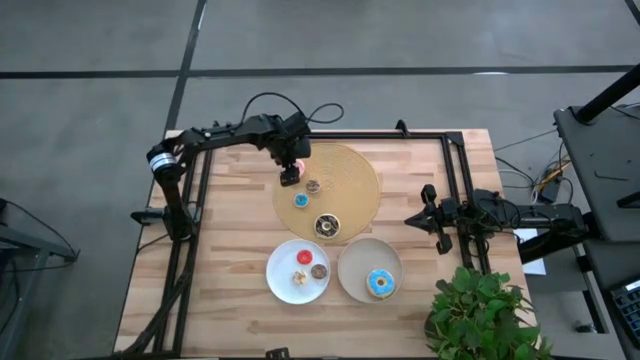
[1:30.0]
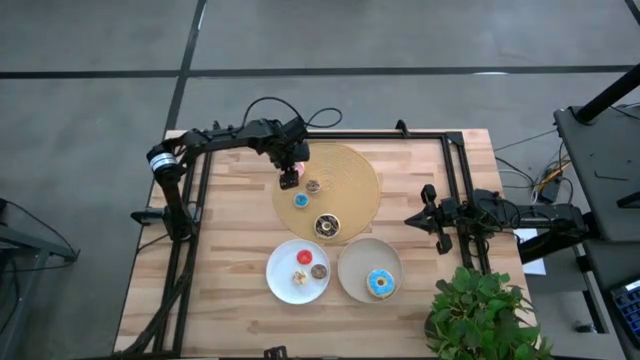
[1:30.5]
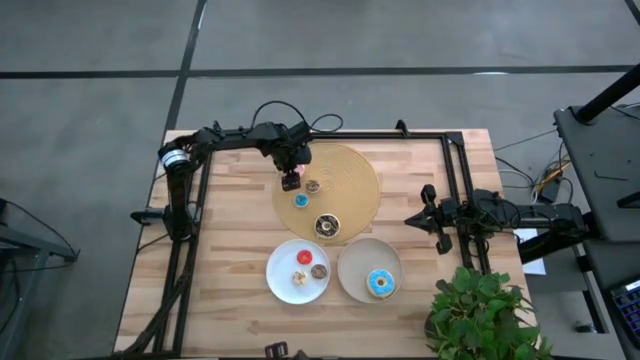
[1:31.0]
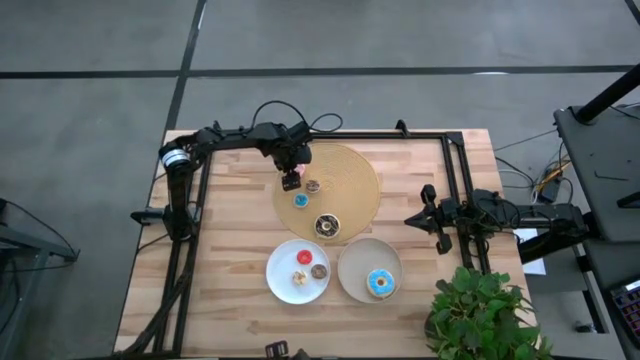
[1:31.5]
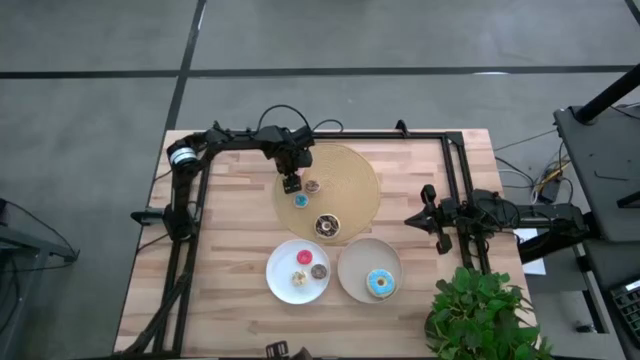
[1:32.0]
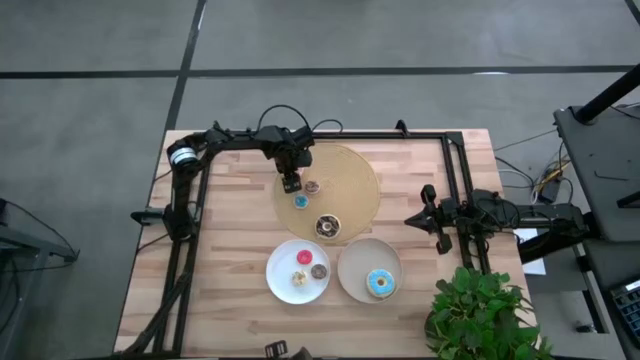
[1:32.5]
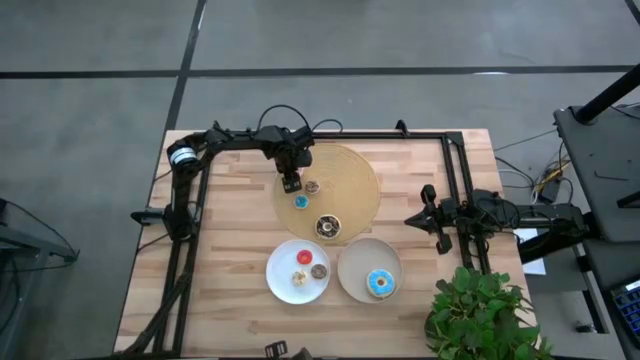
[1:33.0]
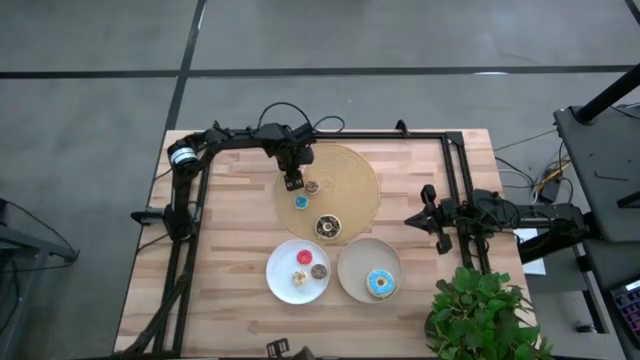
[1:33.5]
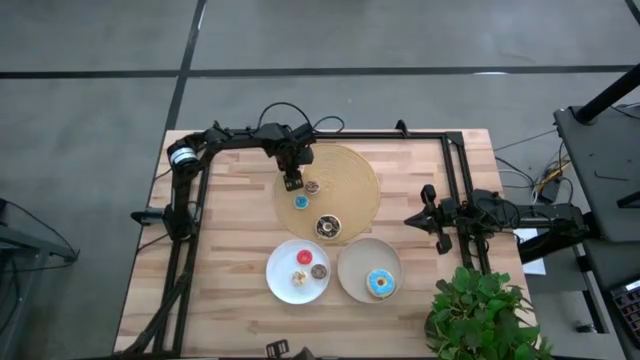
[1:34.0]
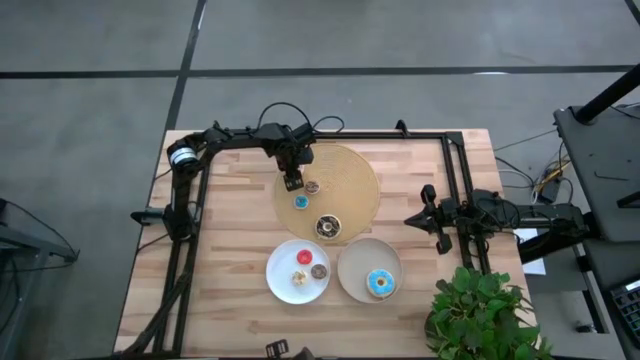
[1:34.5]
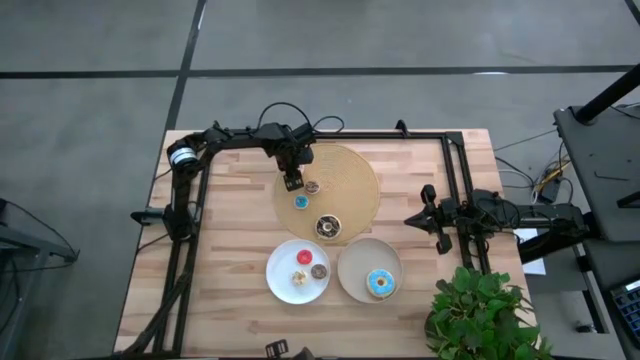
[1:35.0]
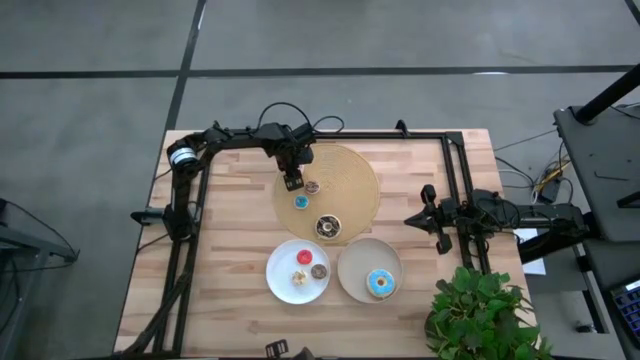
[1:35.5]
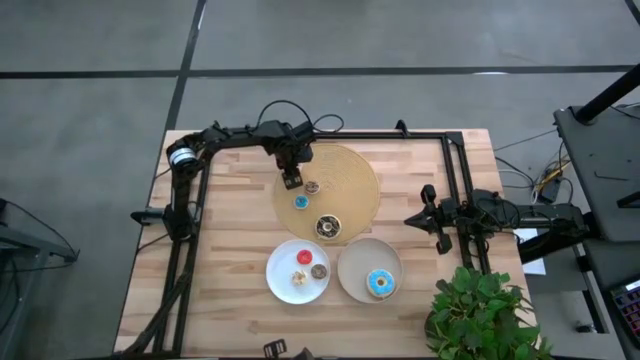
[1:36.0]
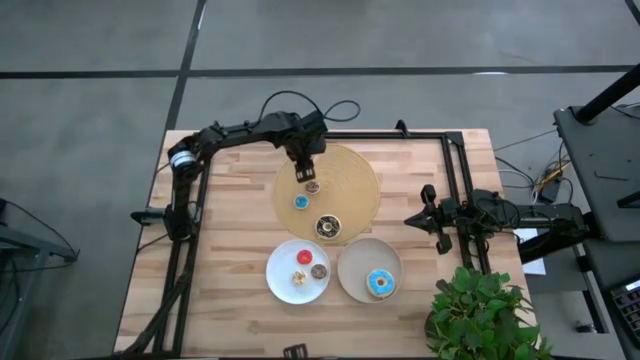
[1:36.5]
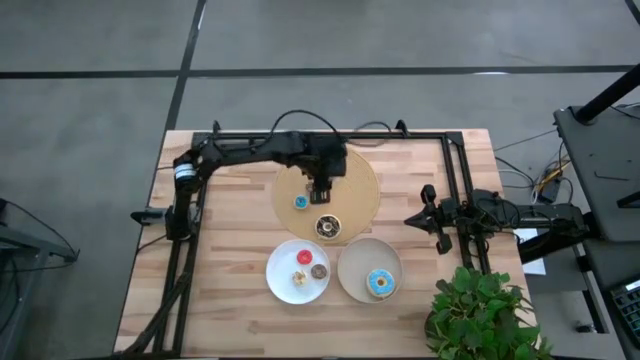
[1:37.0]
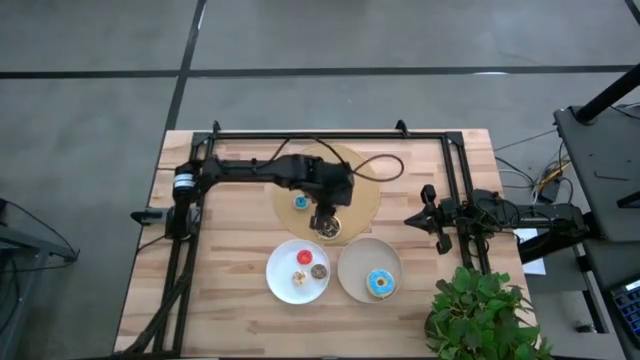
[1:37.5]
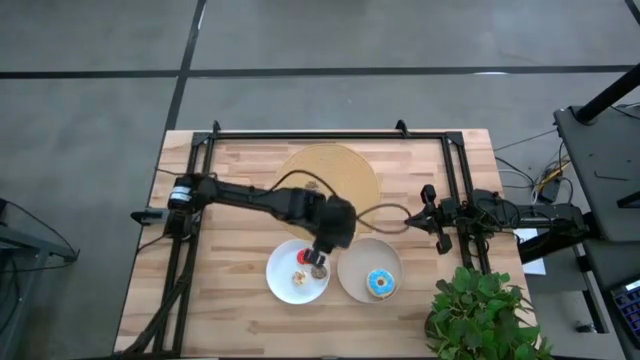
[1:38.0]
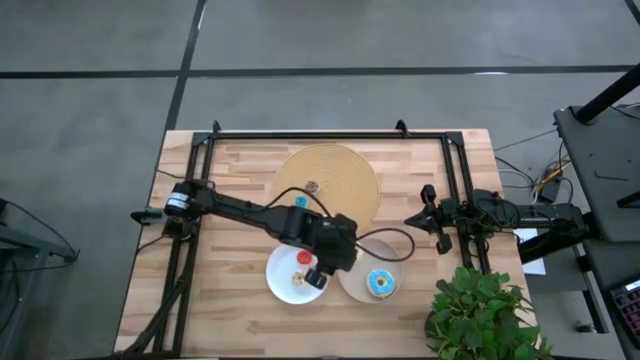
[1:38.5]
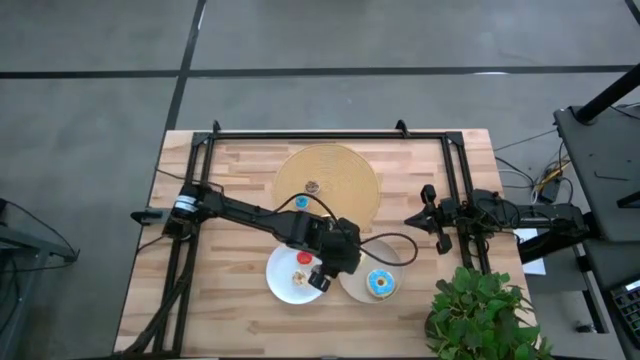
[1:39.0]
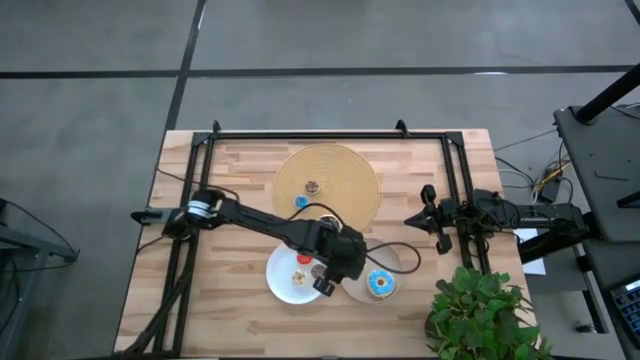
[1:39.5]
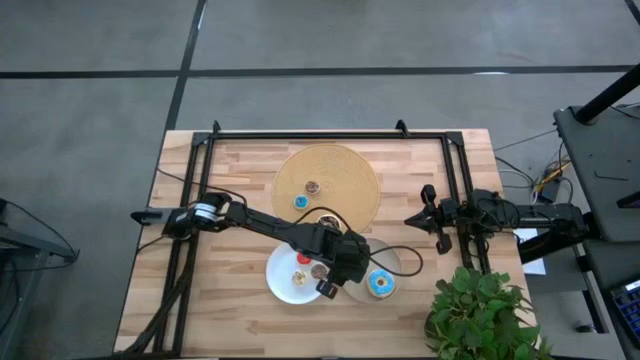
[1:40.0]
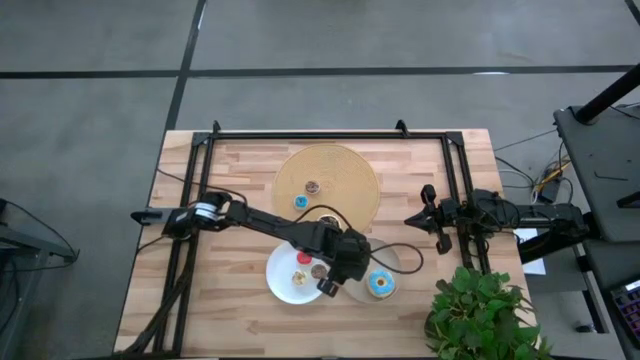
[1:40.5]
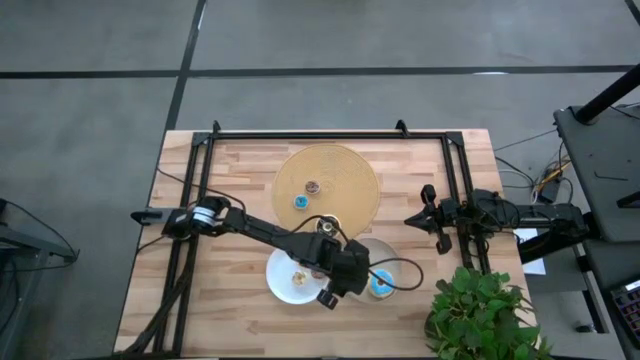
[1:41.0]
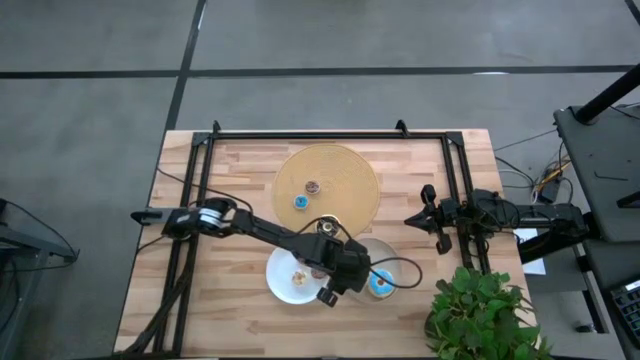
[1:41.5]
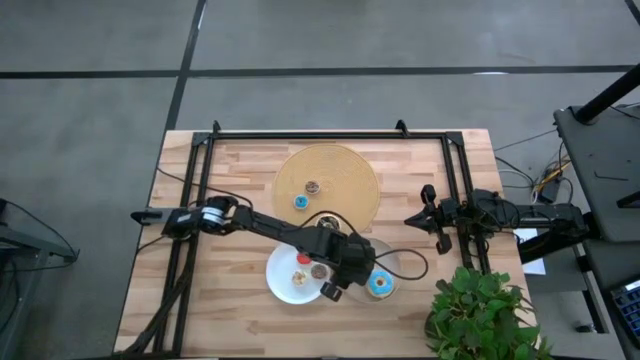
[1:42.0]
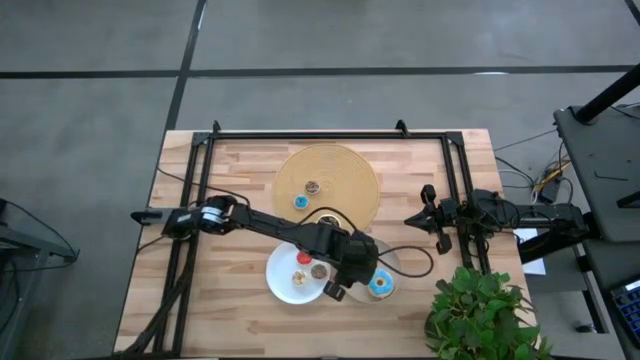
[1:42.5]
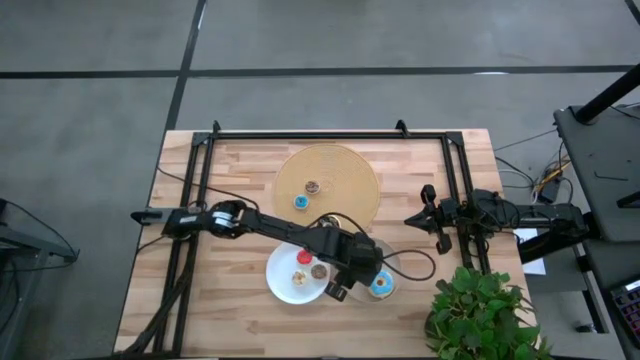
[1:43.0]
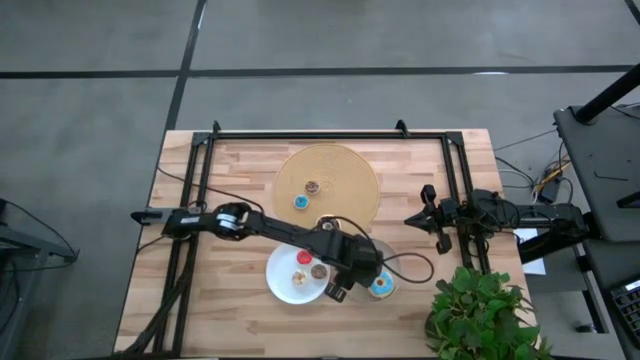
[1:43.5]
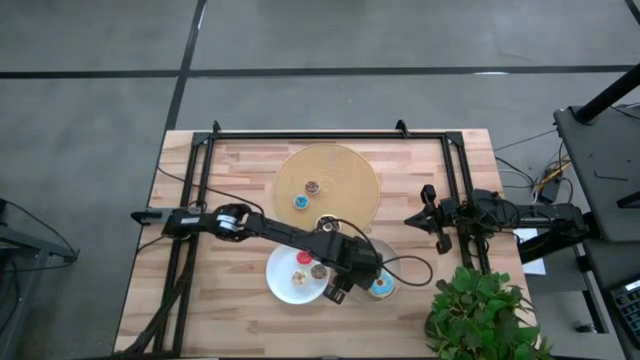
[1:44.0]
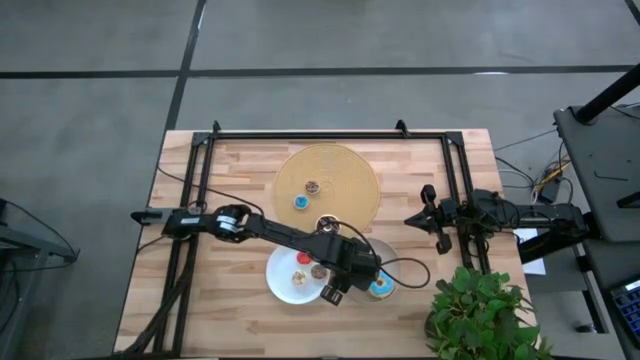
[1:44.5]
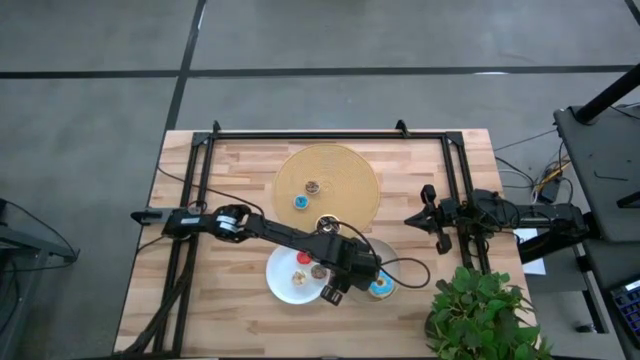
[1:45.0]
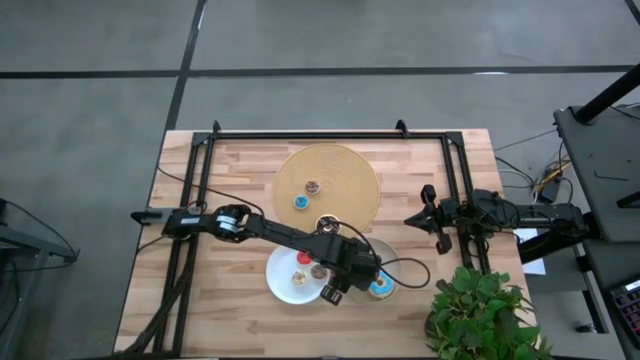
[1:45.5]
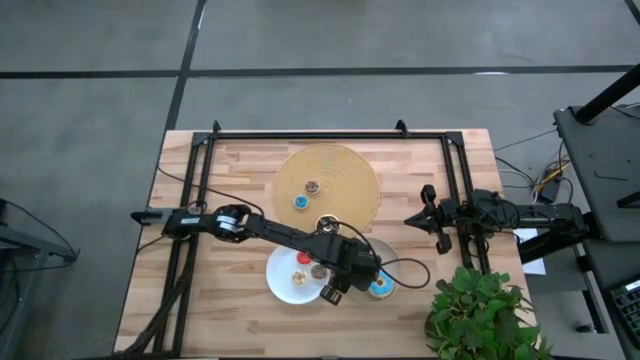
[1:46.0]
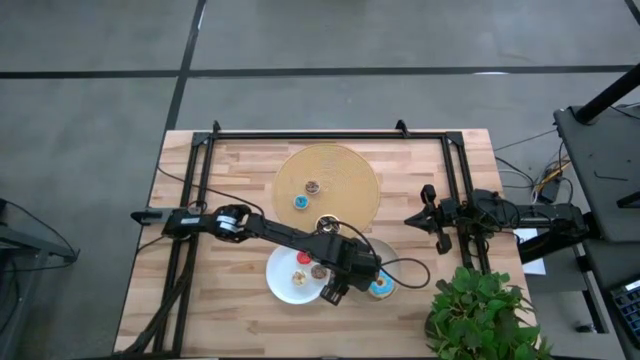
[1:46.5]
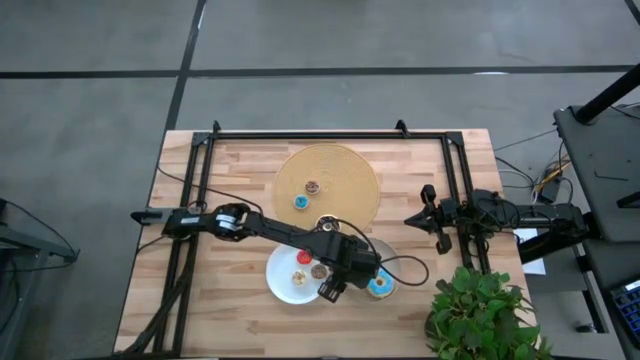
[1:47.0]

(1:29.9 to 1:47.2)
Task: Pick & Place donuts
Put the big pink donut on the brown plate

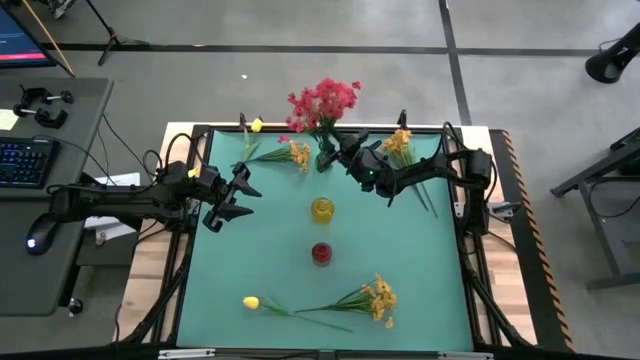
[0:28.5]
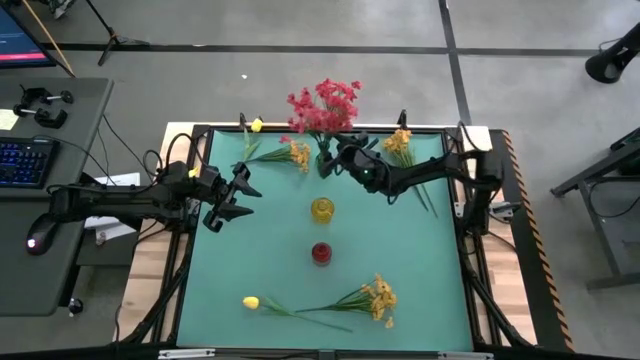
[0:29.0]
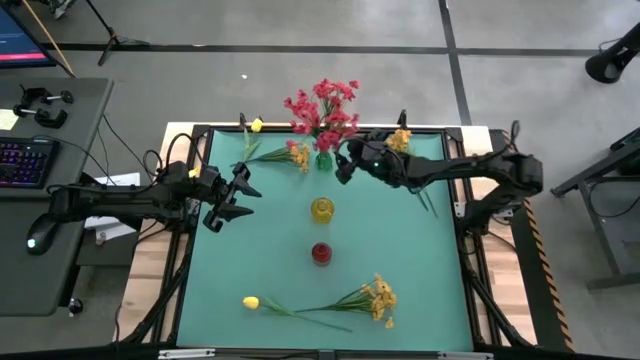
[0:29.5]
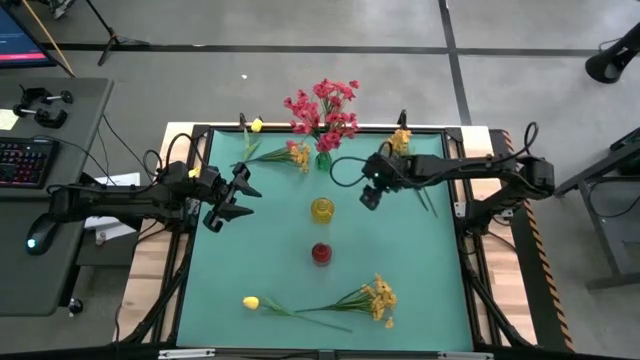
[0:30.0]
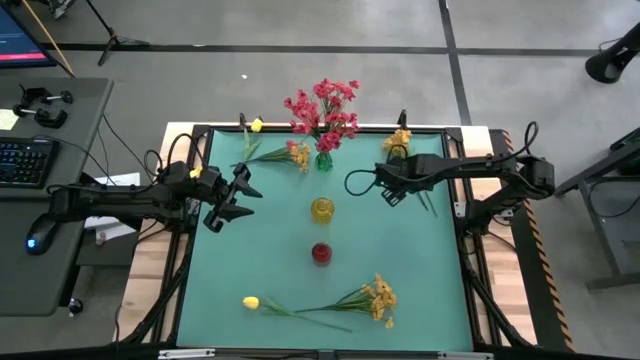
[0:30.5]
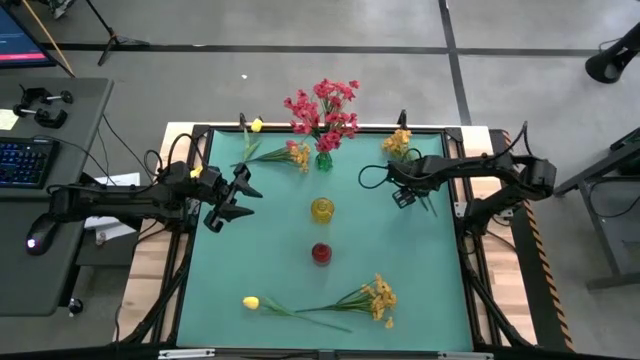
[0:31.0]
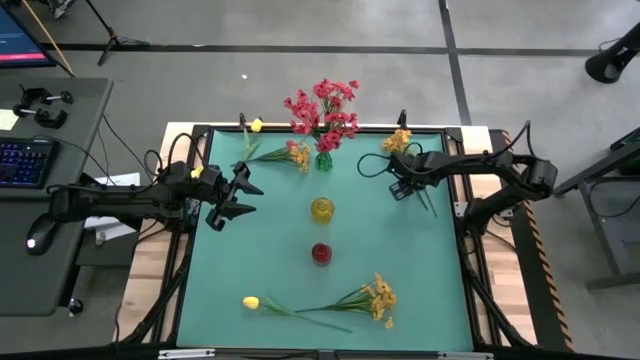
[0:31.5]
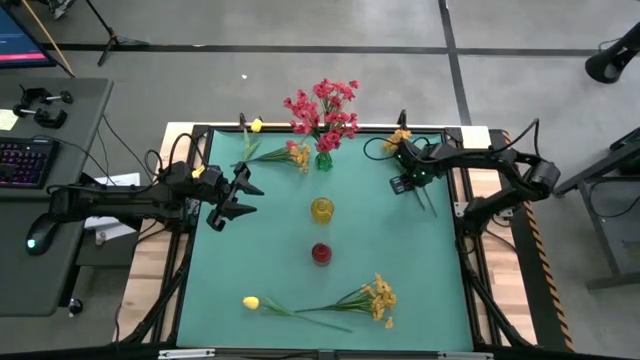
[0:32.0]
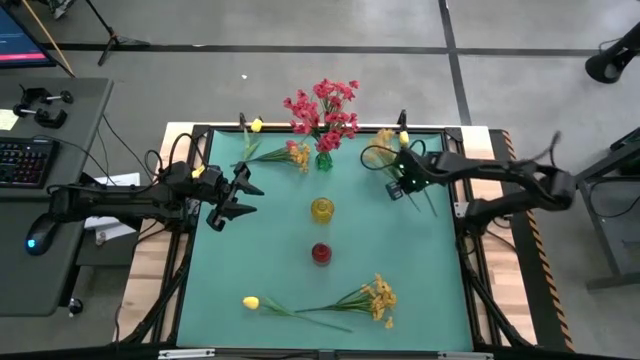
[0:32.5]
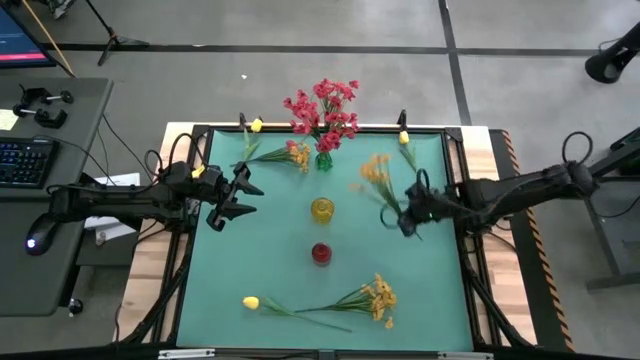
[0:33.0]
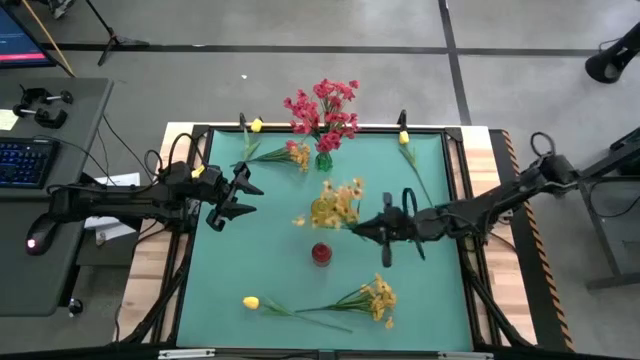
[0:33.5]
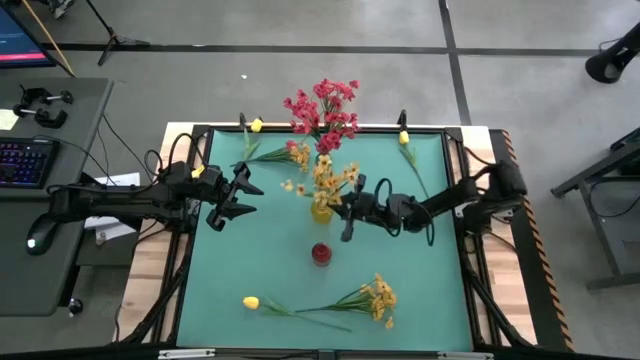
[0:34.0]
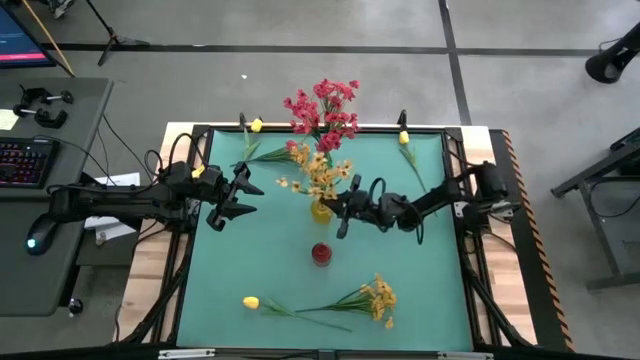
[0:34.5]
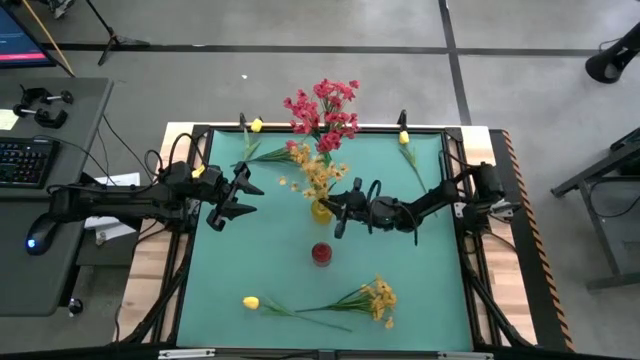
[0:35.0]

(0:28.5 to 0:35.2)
Task: Sort flowers into vase by color
Put the top right yellow flowers into the yellow vase
